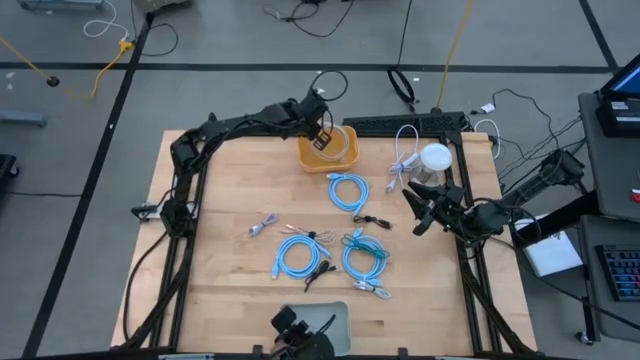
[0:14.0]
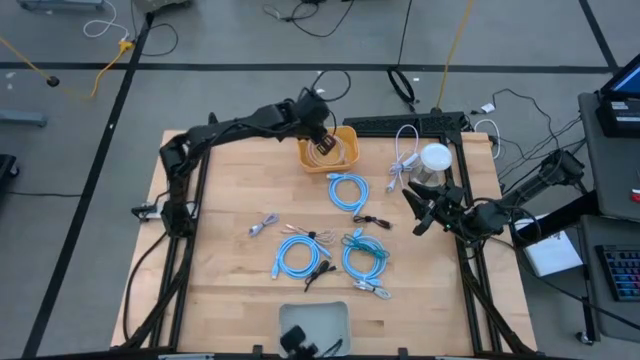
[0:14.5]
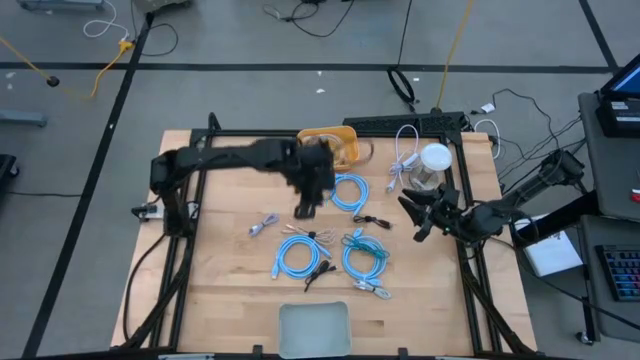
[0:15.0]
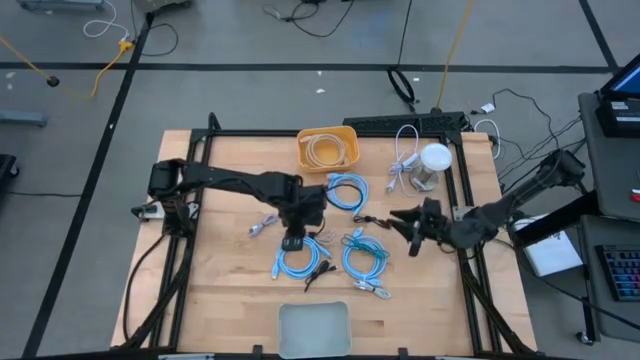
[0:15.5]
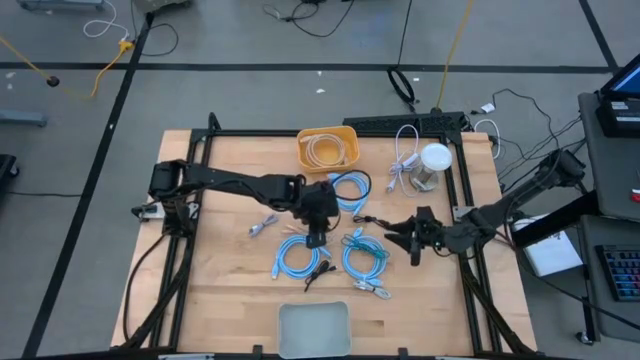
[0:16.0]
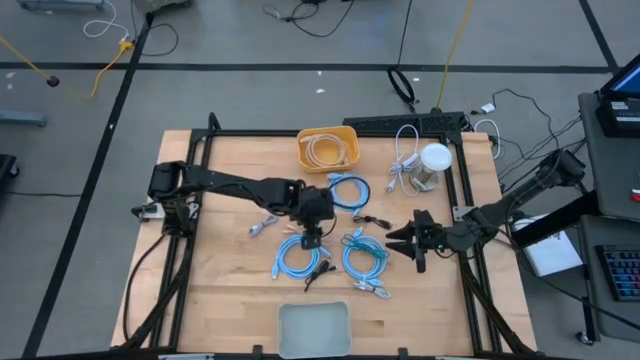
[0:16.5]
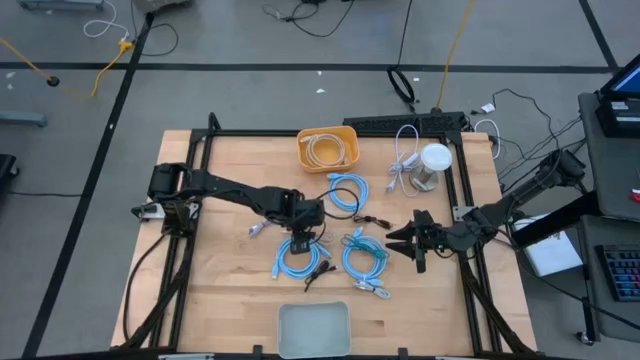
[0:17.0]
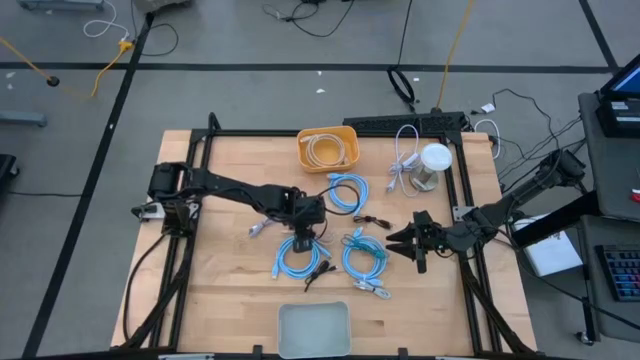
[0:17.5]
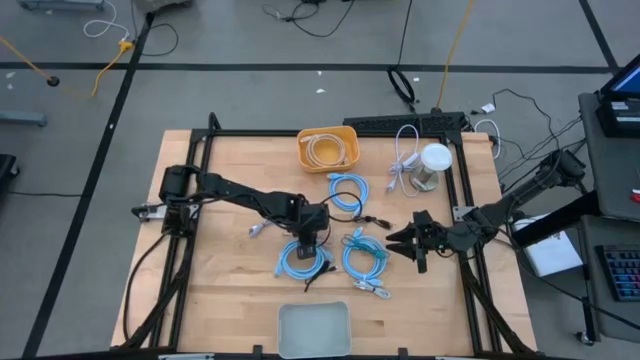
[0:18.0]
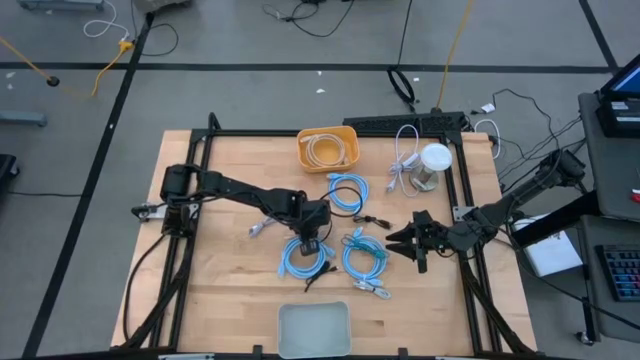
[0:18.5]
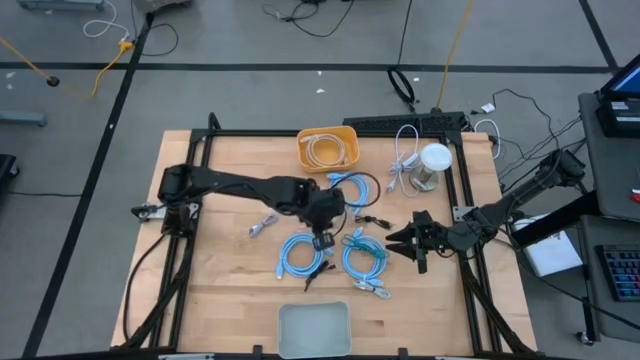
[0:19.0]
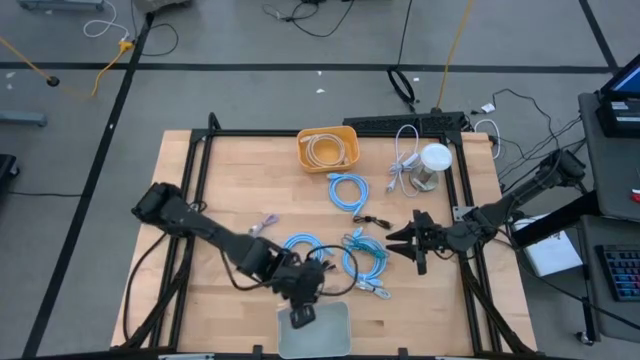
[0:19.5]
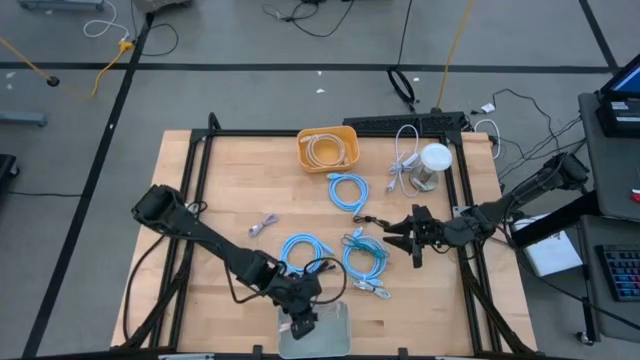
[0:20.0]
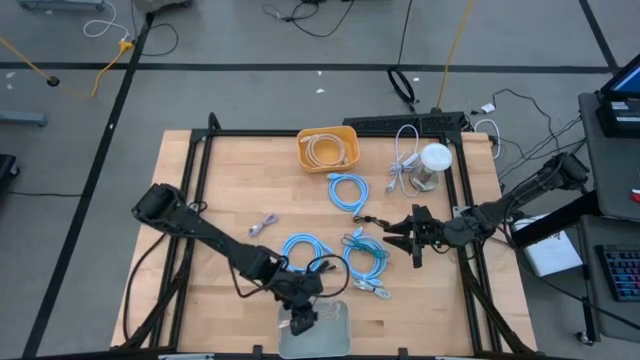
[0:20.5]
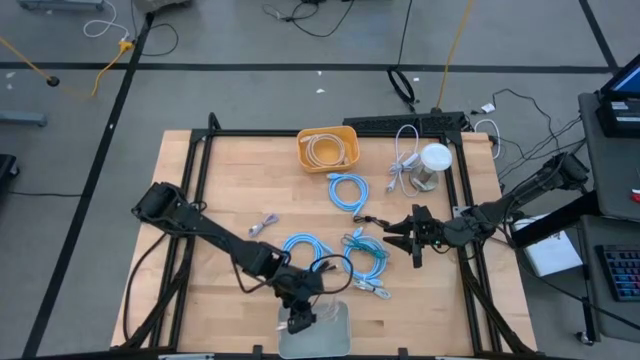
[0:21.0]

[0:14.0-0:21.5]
Task: Pick & Place USB Port
Put the brown charger cable into the gray bin

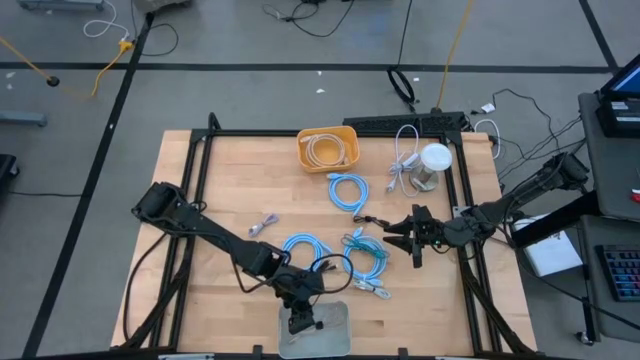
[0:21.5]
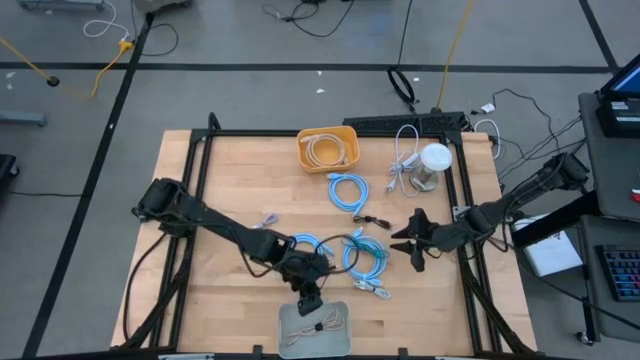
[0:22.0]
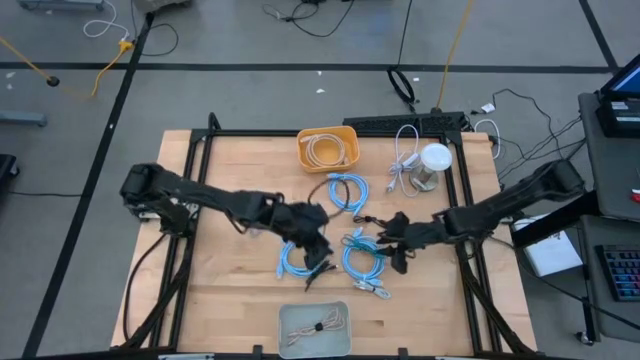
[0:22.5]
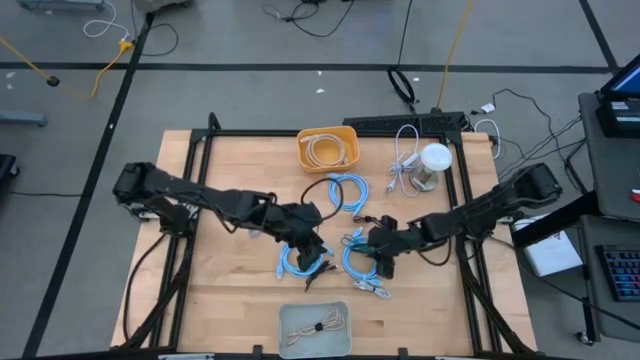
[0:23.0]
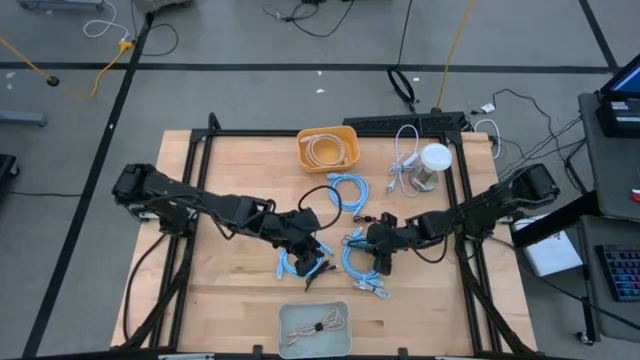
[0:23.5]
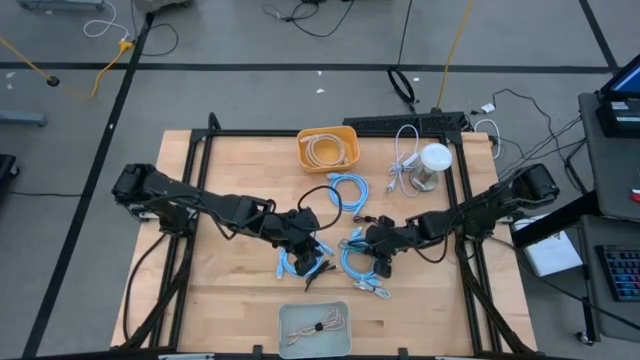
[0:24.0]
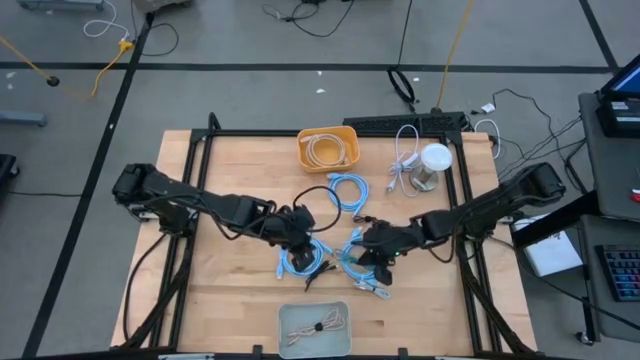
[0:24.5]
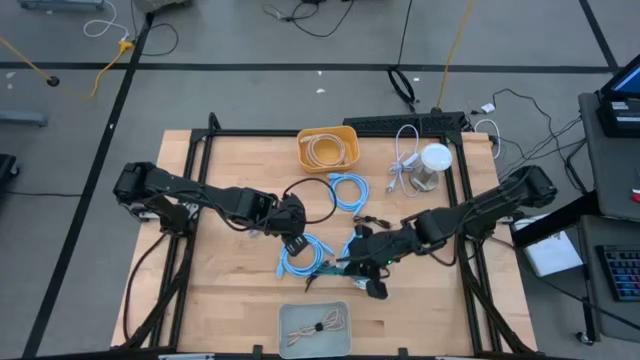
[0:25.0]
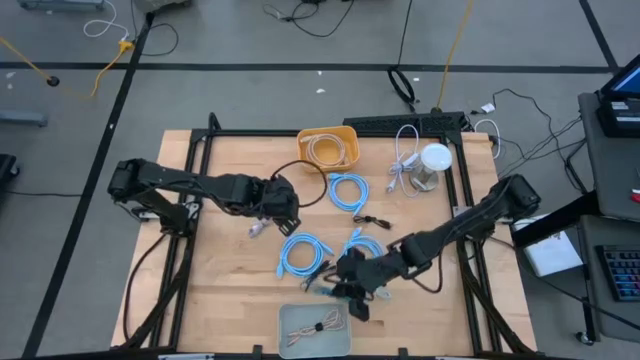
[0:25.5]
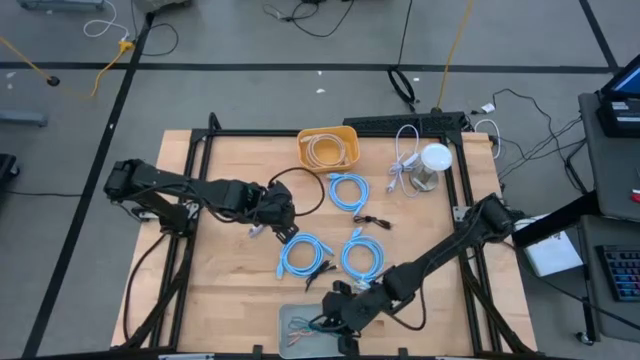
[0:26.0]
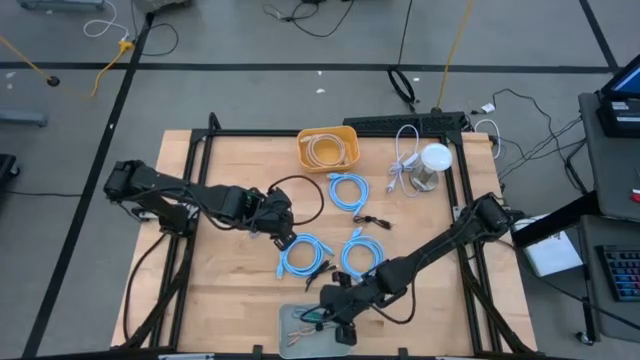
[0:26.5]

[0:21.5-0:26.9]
Put the blue charger cable into the gray bin

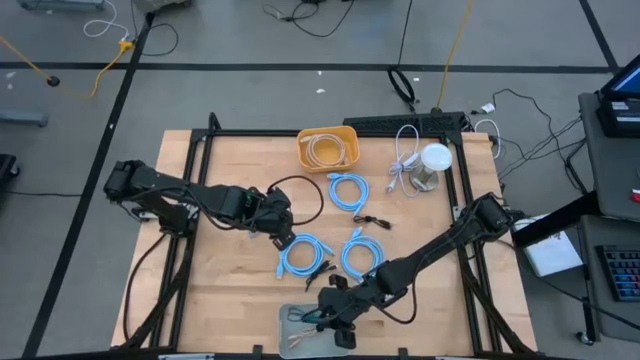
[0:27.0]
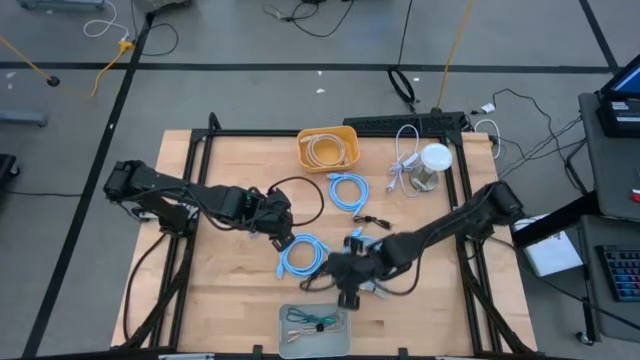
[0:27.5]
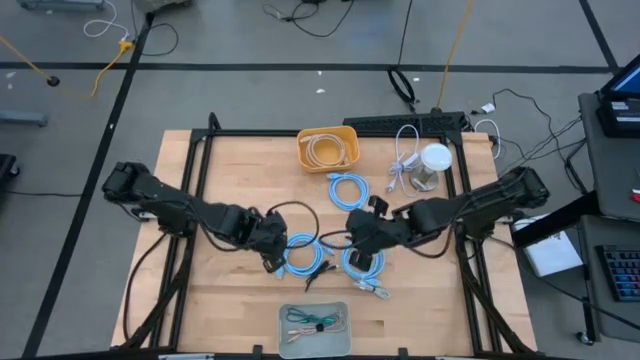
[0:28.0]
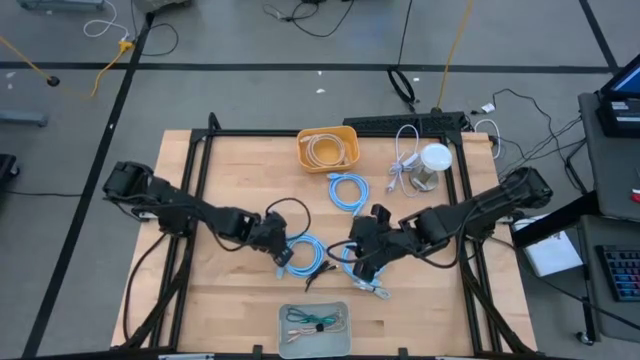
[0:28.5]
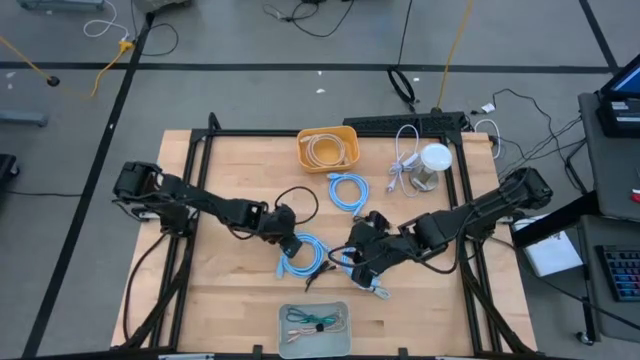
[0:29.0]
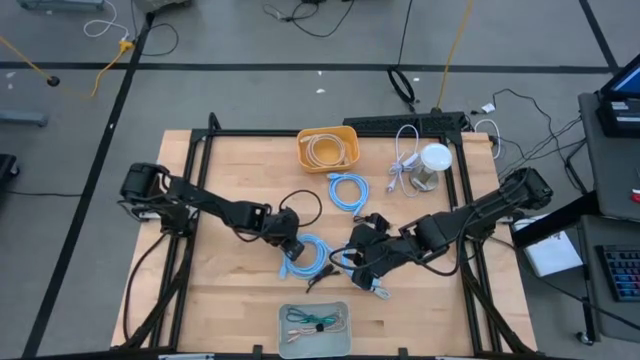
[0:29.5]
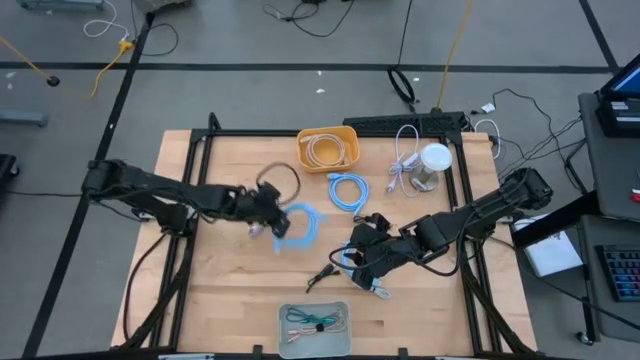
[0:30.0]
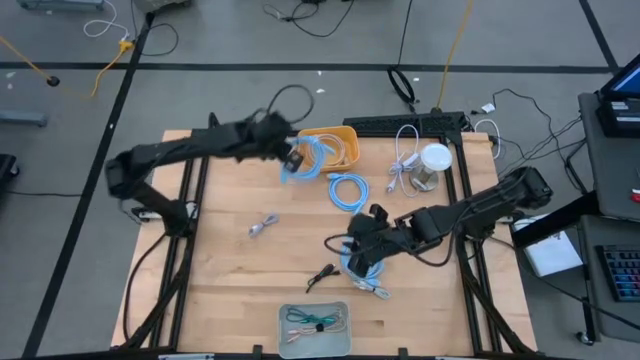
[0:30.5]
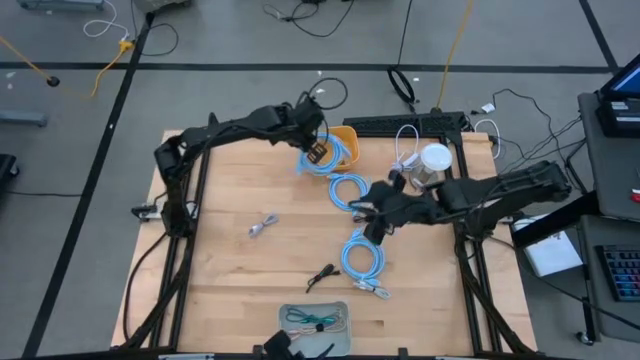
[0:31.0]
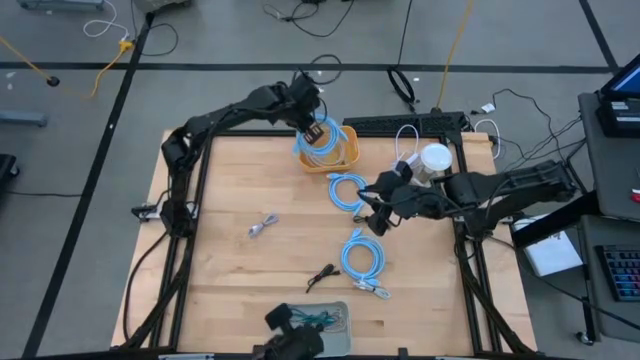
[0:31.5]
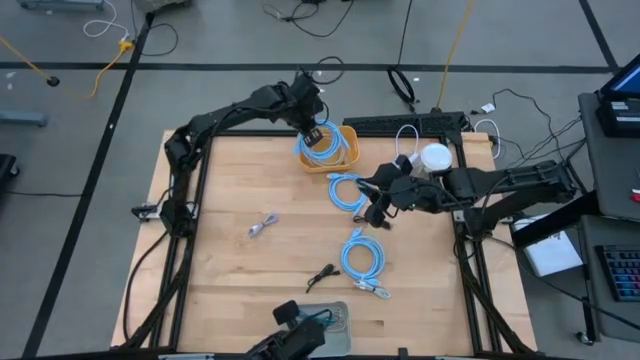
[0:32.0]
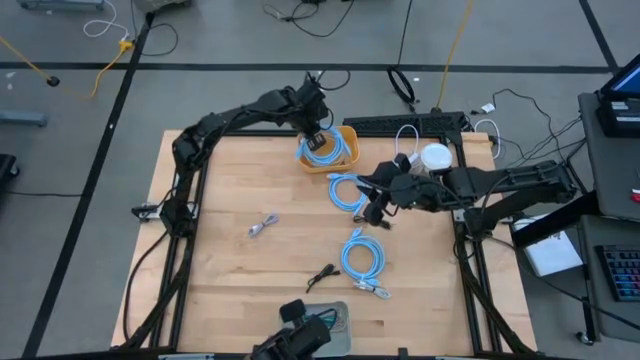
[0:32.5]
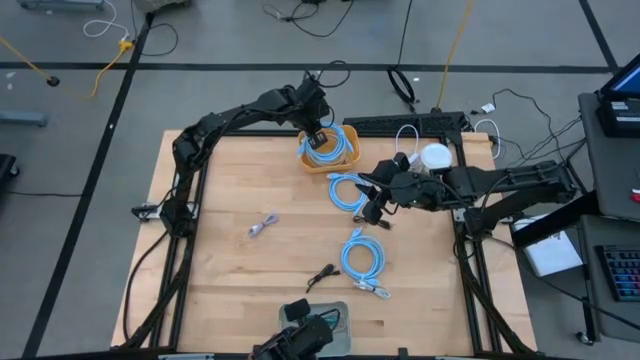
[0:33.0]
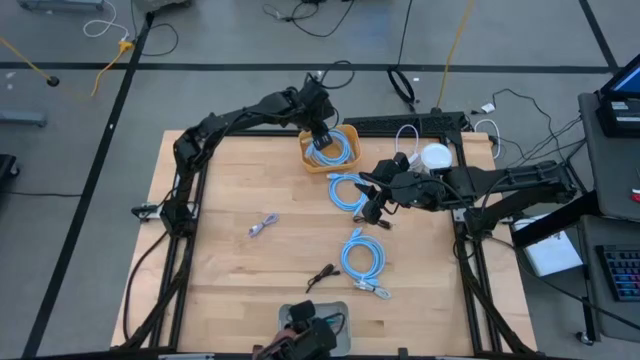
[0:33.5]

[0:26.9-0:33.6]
Put the bottom left HDMI cable into the yellow bin

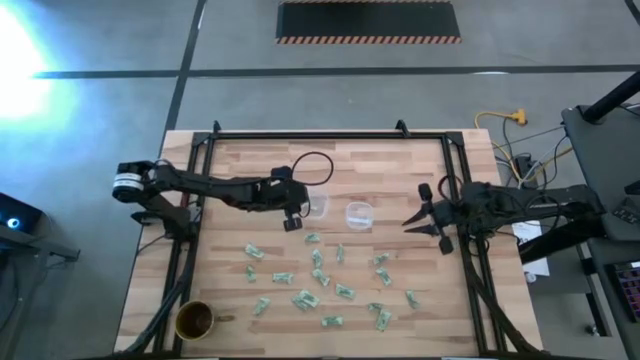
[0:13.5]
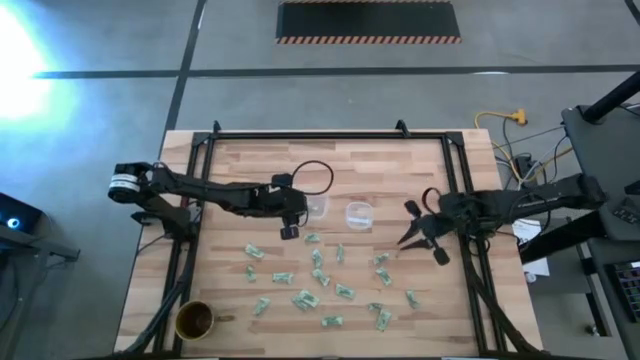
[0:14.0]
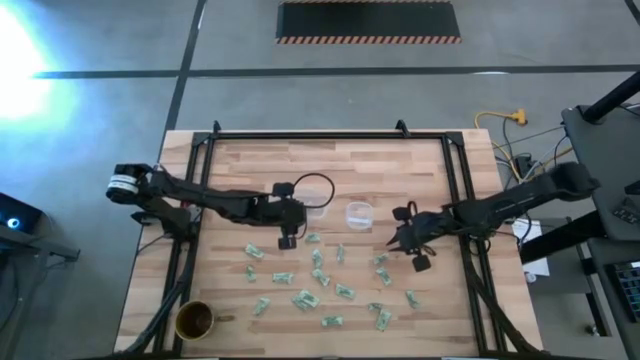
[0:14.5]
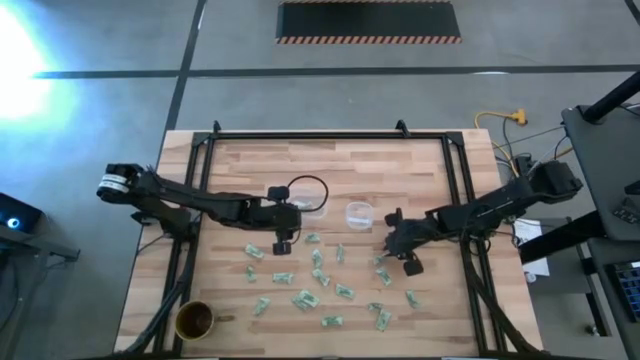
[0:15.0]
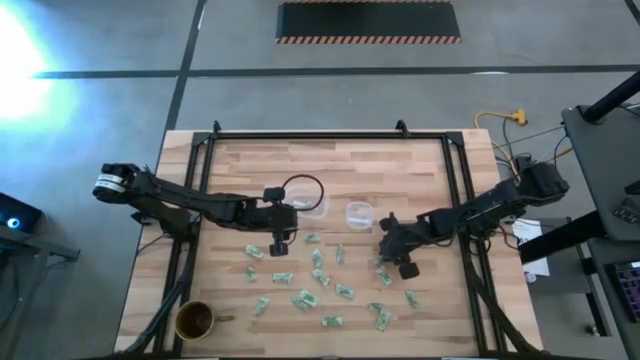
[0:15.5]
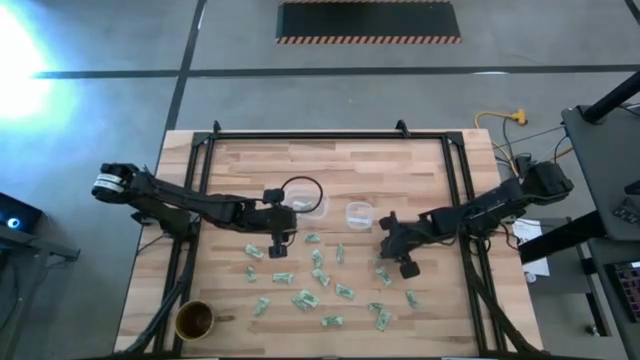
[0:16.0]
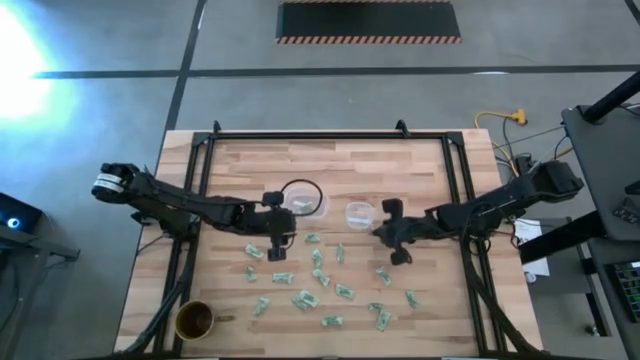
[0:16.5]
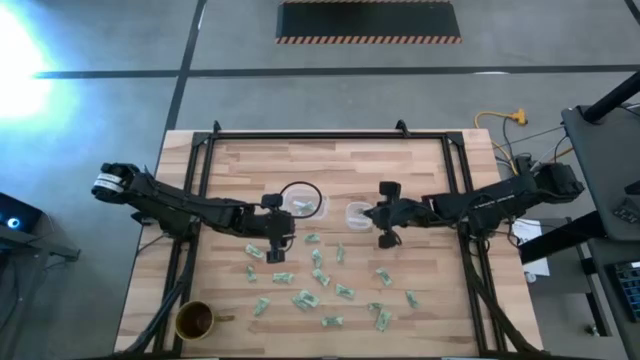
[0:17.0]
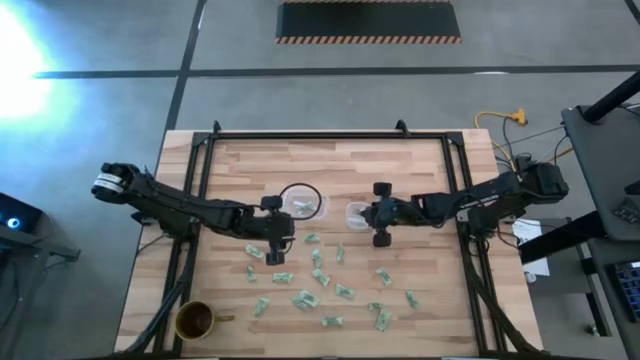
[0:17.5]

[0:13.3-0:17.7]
Task: Pick and place items into bin
Put the green stevia packet into the right transparent bin
